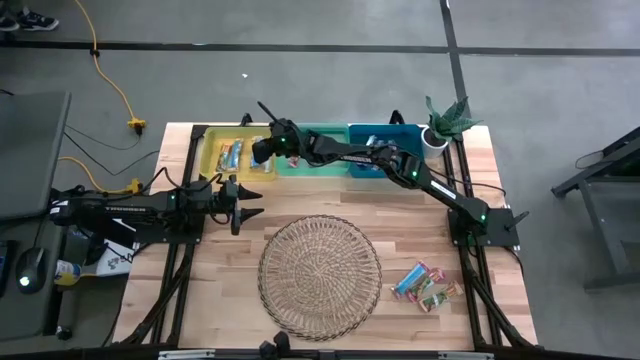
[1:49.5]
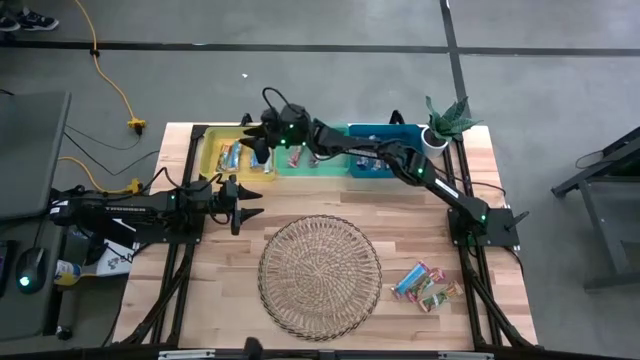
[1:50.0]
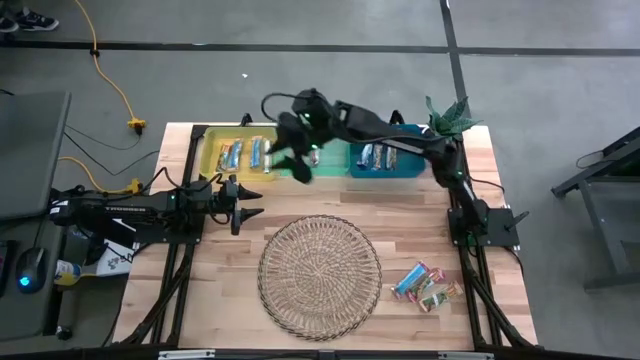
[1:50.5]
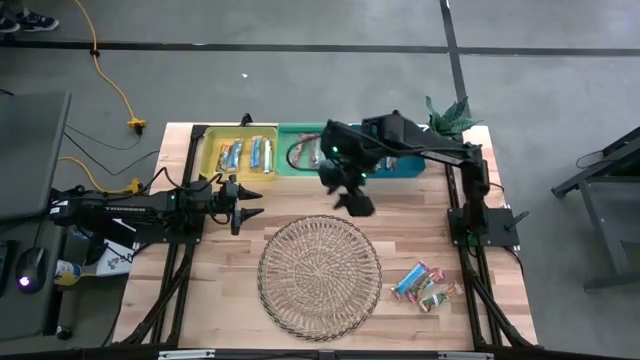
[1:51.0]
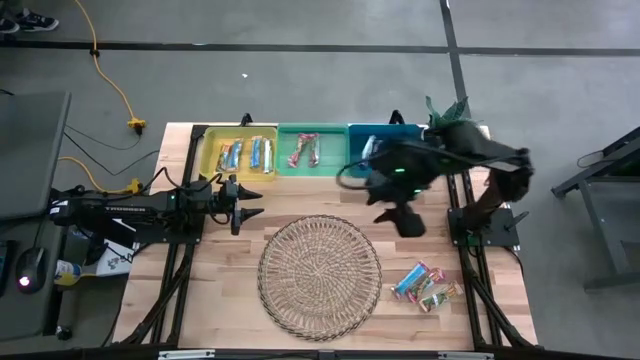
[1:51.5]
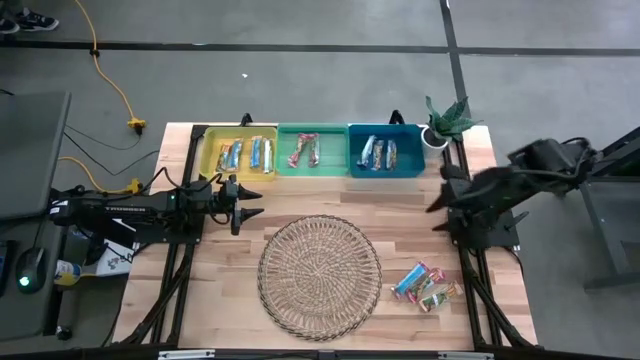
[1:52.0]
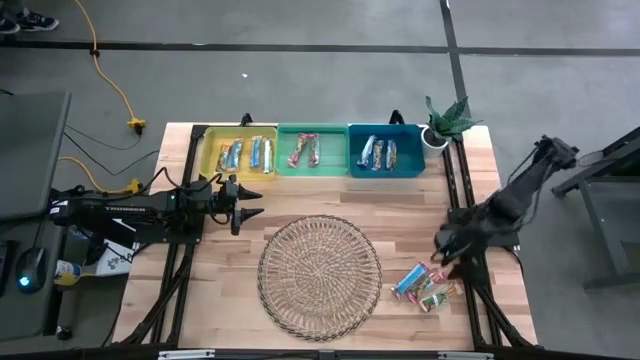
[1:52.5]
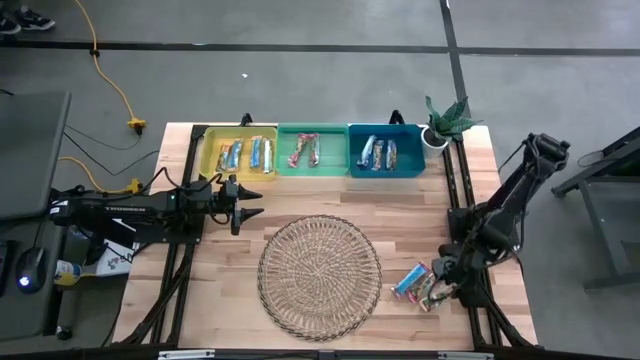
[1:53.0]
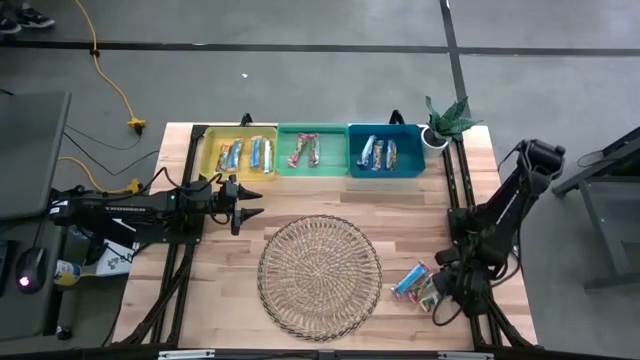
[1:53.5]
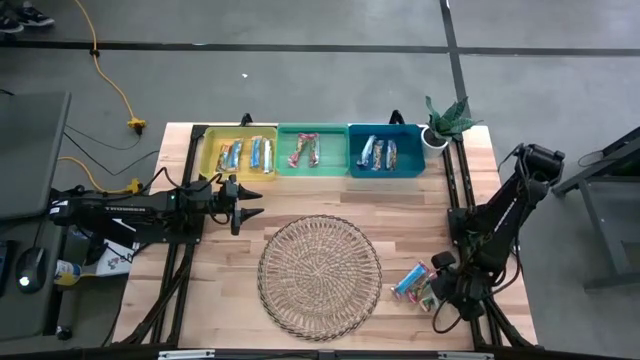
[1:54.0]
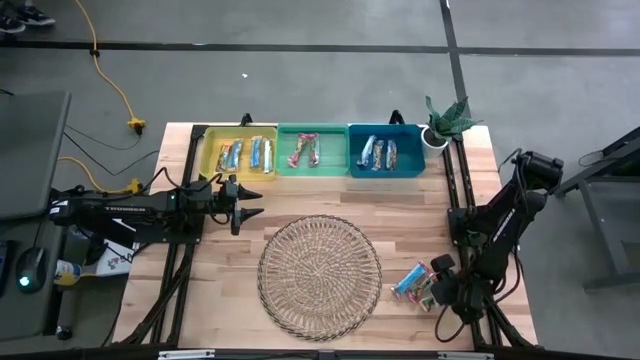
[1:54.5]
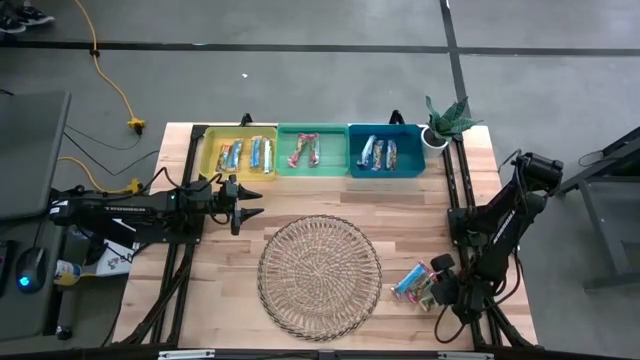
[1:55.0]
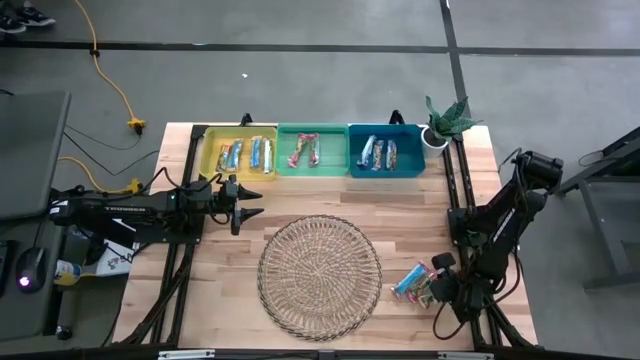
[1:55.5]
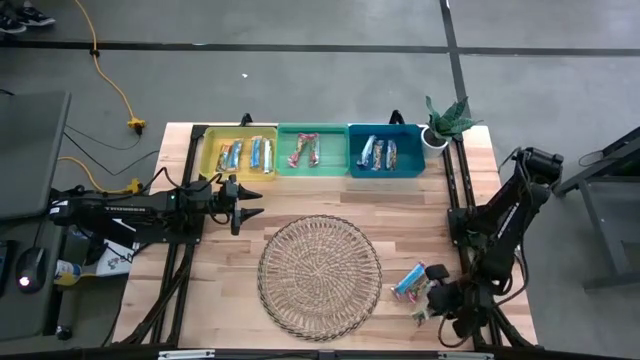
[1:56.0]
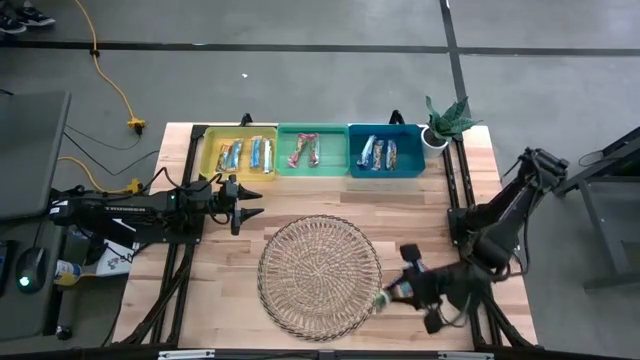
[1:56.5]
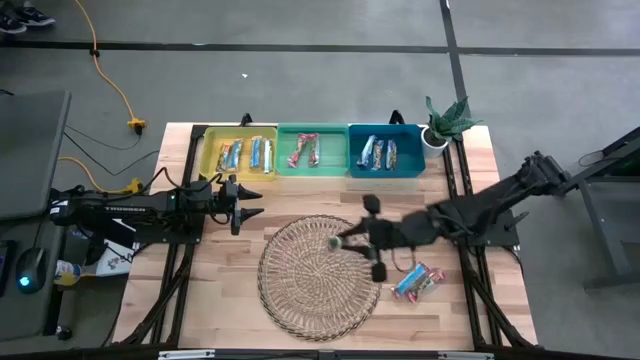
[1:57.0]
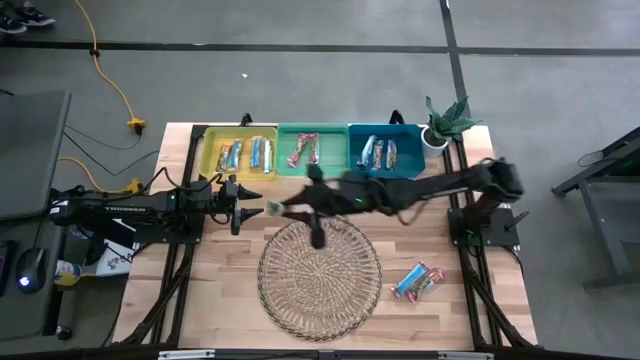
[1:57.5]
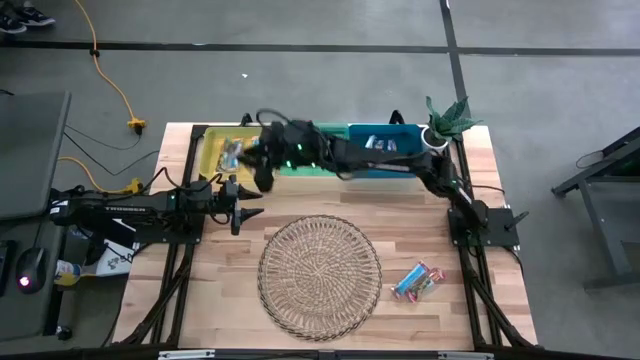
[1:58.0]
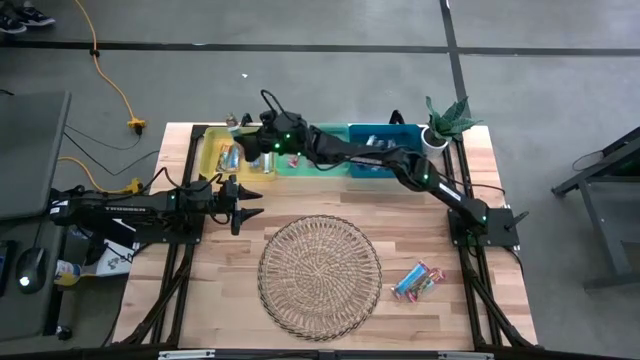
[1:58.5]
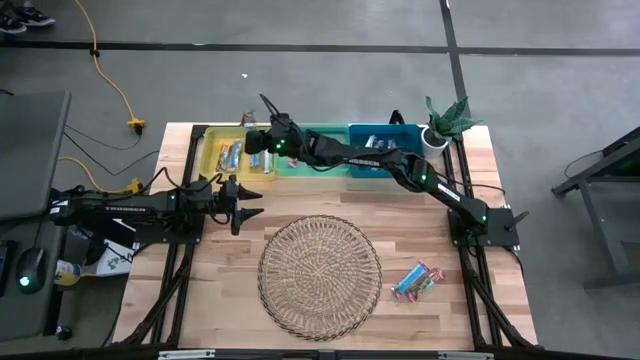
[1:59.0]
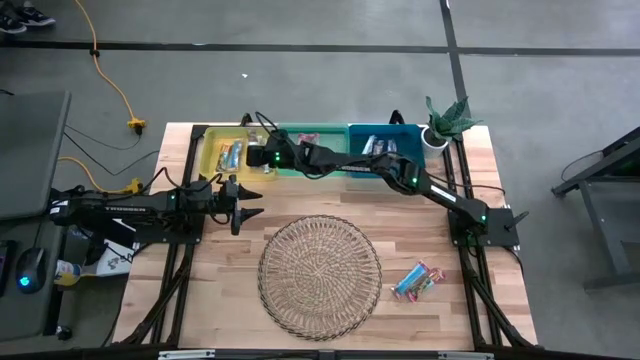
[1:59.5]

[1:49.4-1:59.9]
Task: Pick and place Granola Bars by type
Put the yellow granola bar into the yellow bin

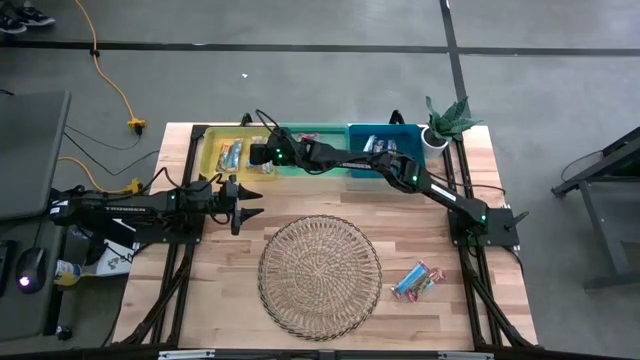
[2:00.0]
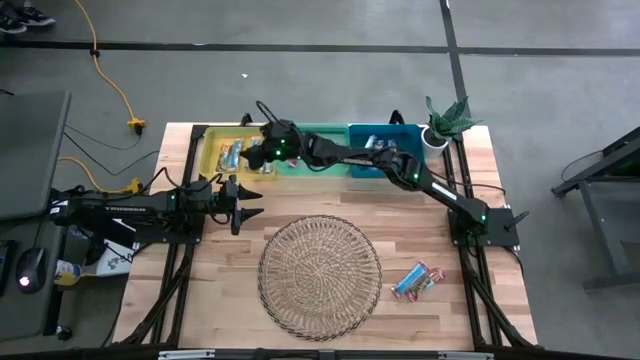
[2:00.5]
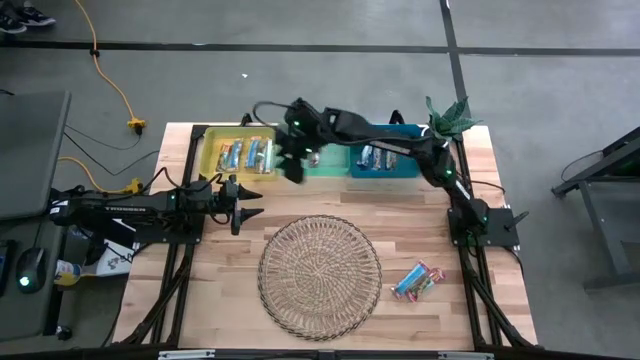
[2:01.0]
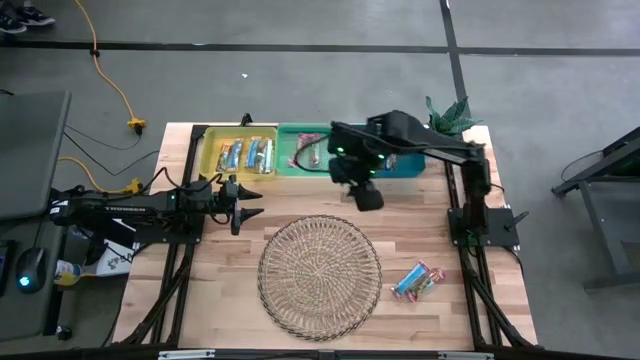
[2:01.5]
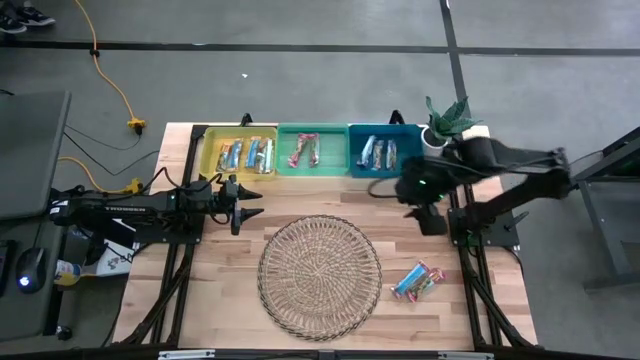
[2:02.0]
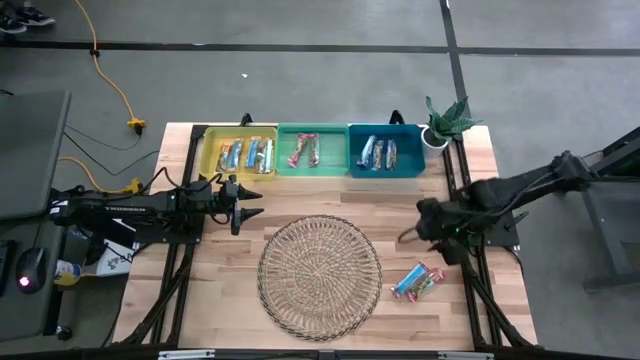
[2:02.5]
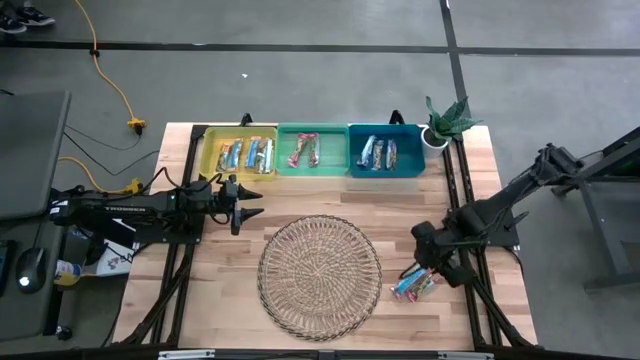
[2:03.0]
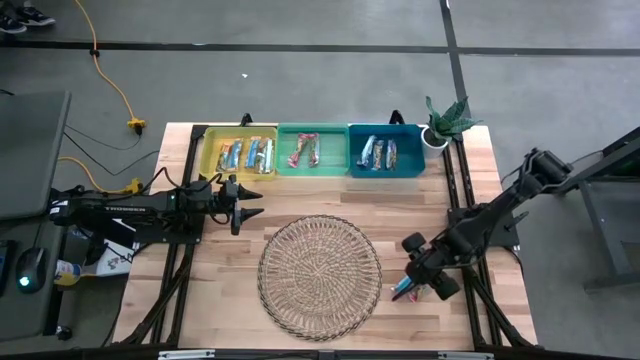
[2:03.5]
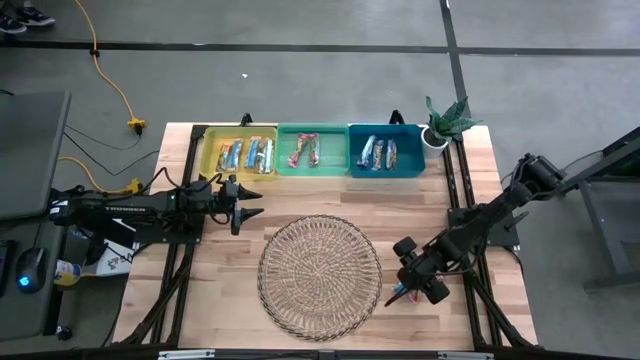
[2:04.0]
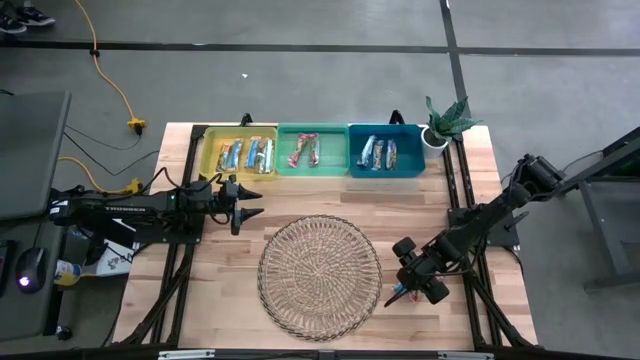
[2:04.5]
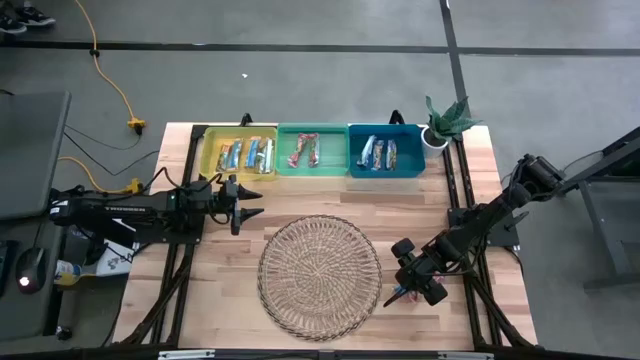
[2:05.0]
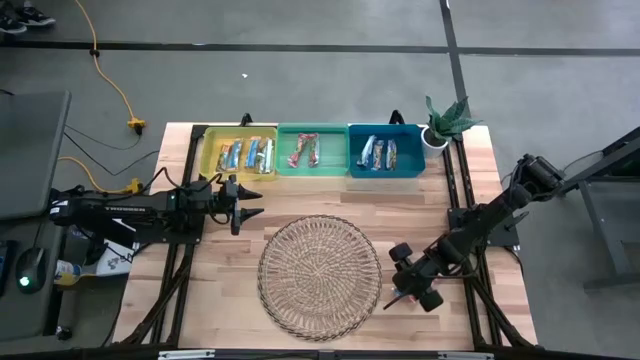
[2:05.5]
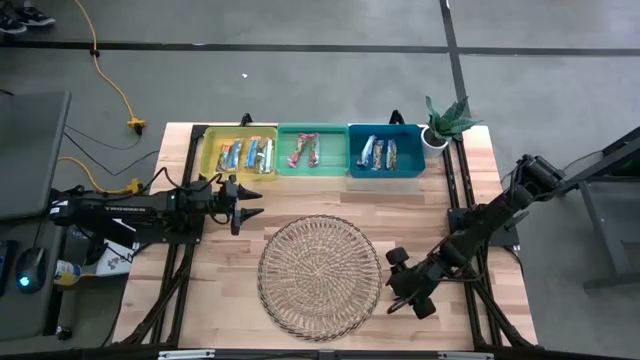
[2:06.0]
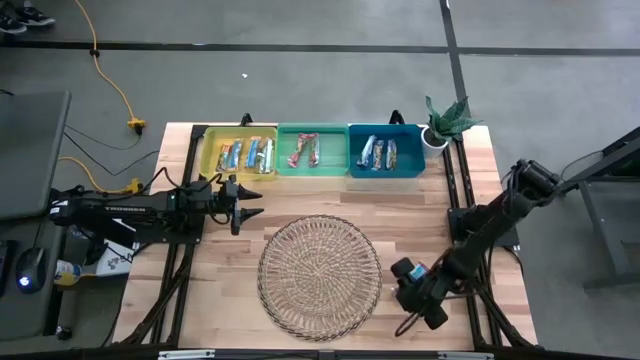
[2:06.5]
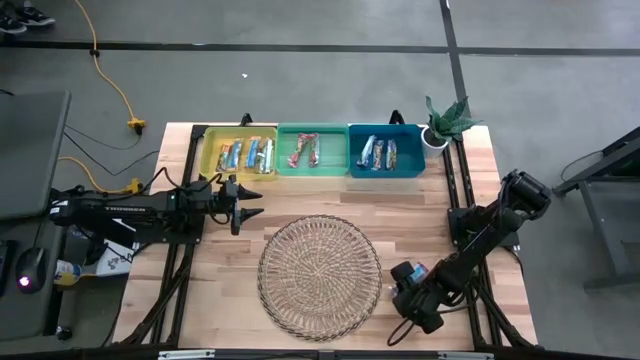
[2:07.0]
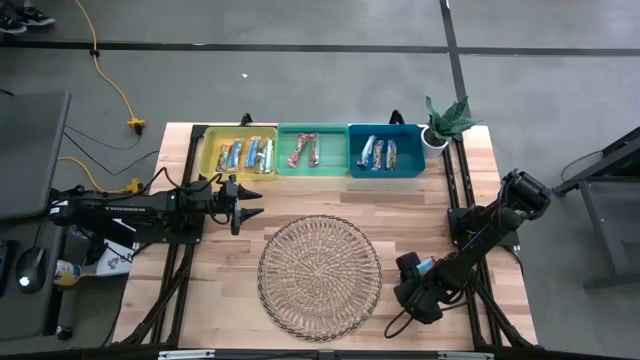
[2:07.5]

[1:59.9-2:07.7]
Put the red granola bar into the green bin

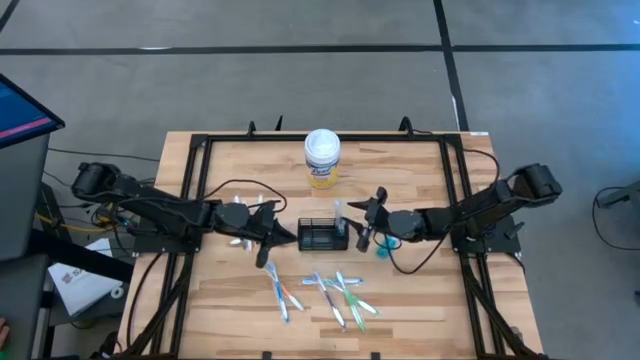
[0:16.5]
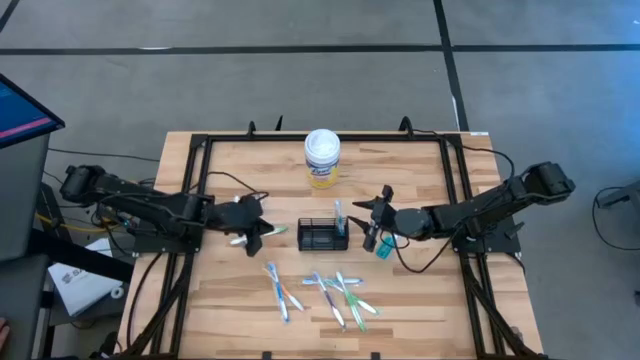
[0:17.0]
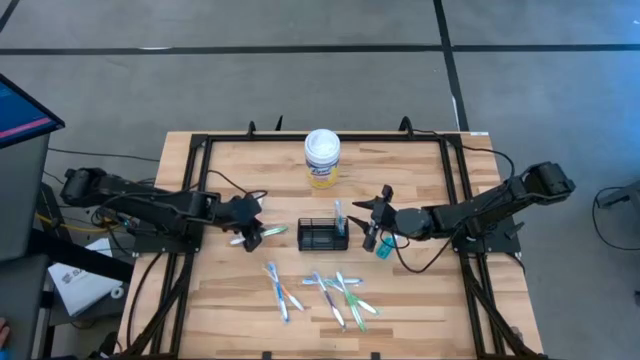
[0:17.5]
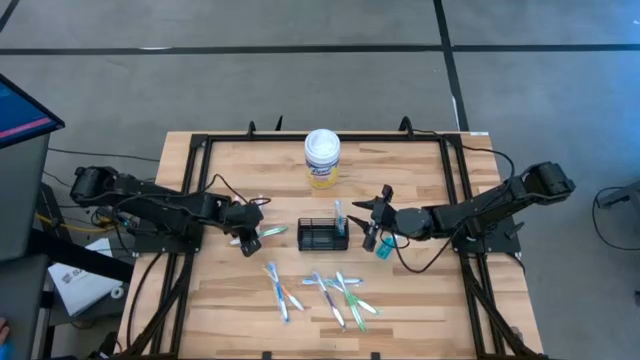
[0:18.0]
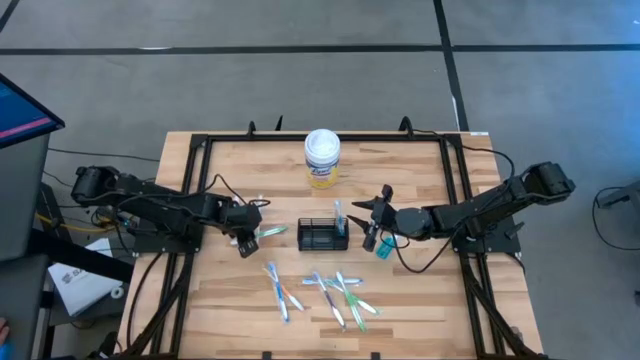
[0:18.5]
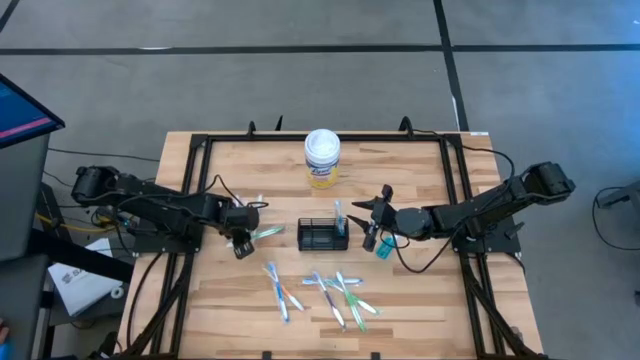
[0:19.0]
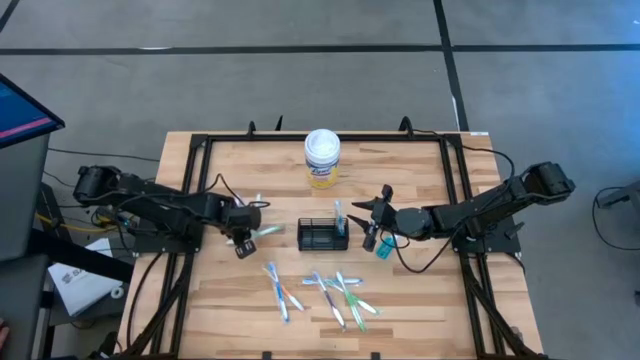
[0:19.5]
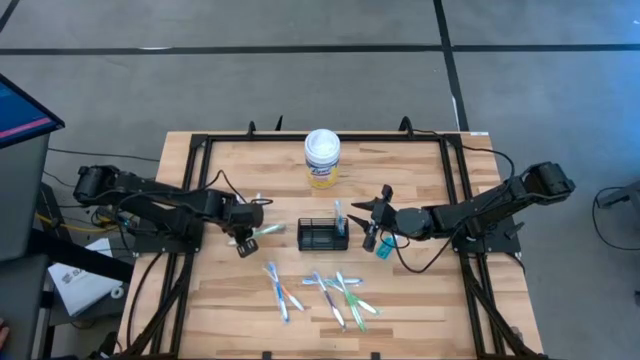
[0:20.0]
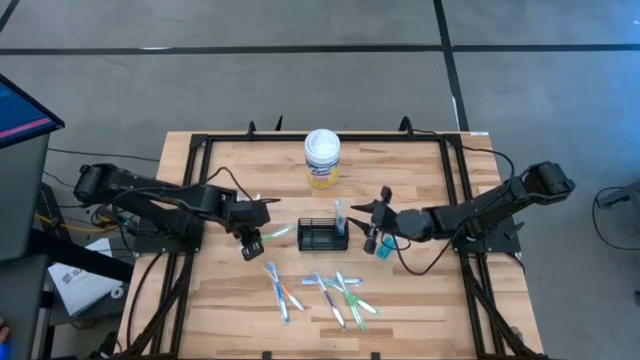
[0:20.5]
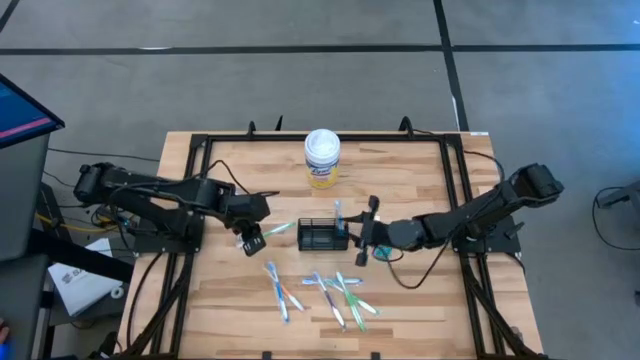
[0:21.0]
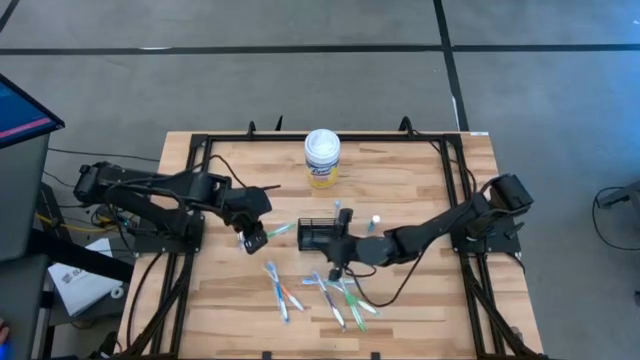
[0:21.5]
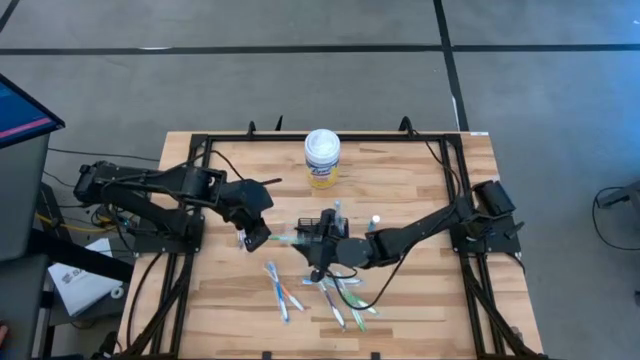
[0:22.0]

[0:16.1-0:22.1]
Task: Pick & Place toothbrushing station
Put the top green toothbrush into the black mesh organizer
